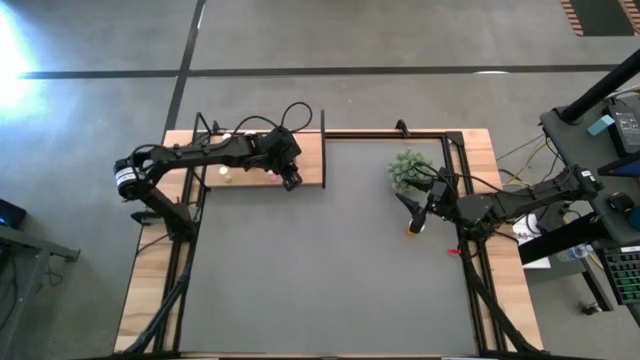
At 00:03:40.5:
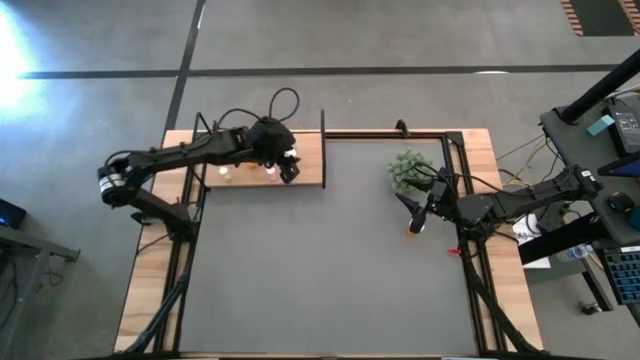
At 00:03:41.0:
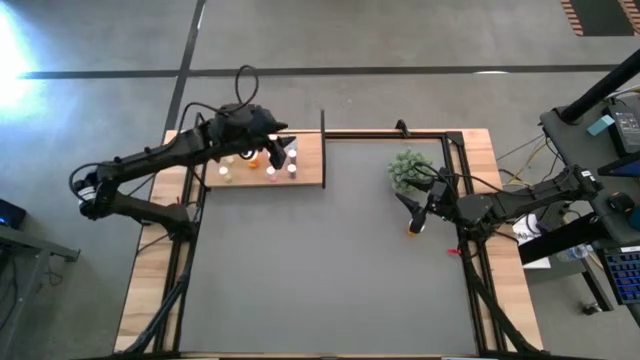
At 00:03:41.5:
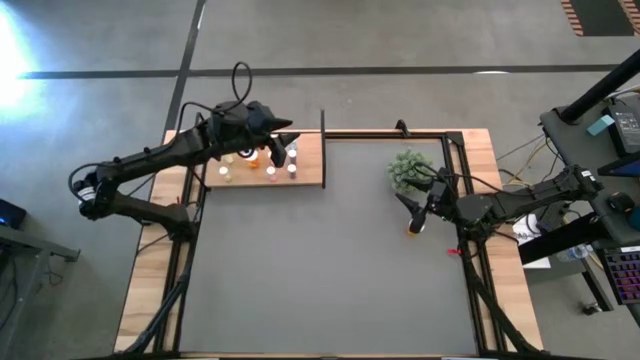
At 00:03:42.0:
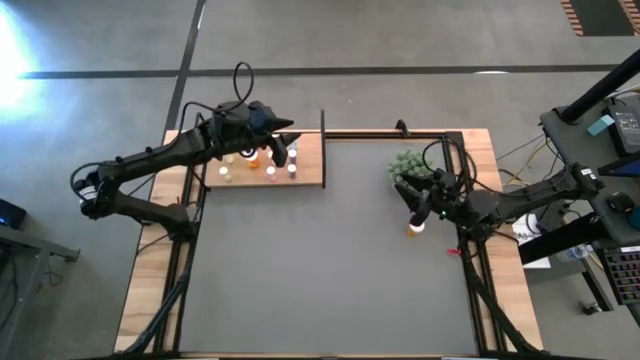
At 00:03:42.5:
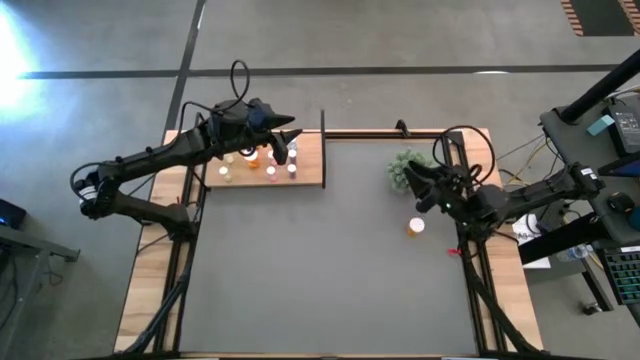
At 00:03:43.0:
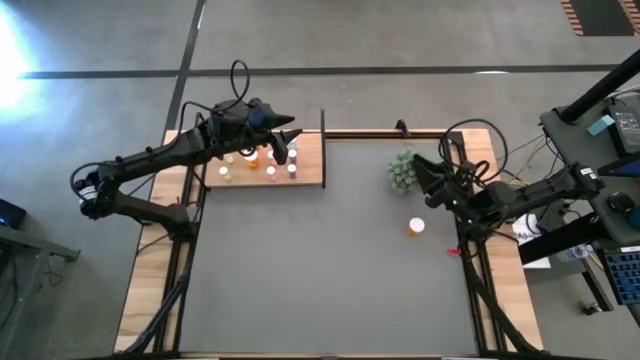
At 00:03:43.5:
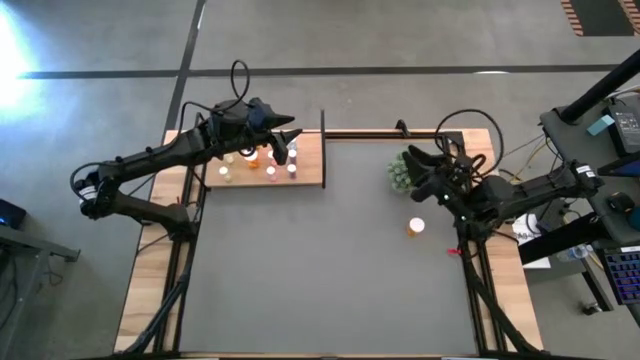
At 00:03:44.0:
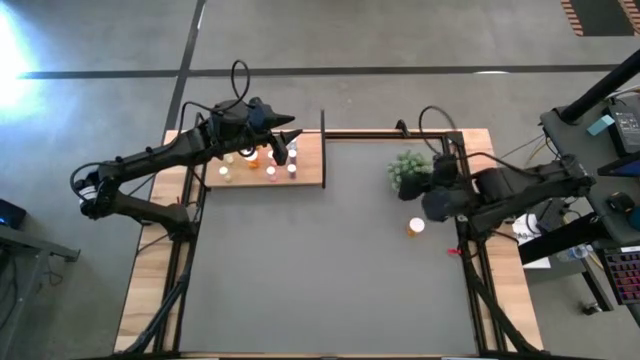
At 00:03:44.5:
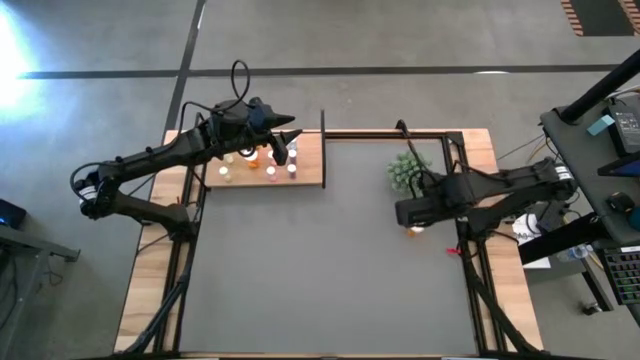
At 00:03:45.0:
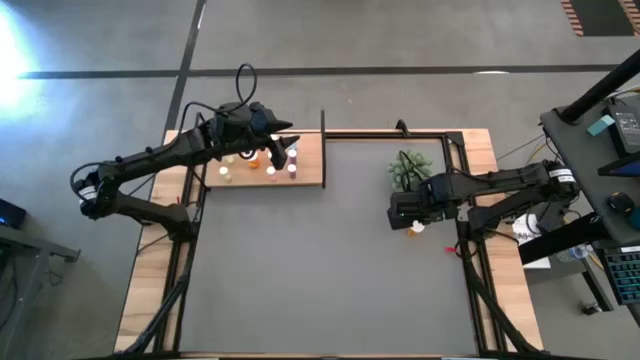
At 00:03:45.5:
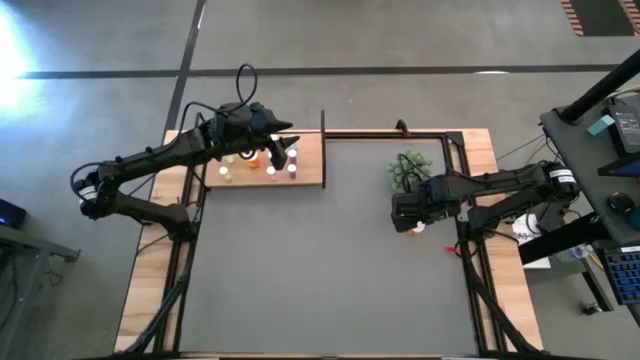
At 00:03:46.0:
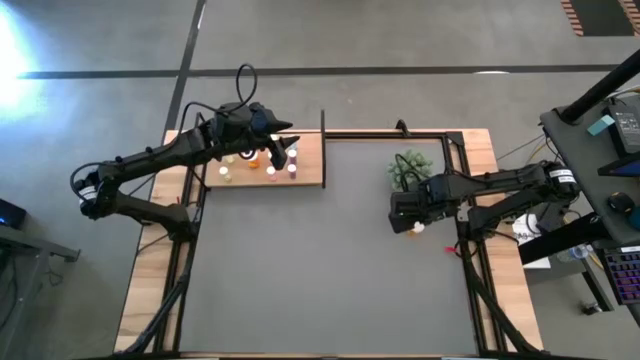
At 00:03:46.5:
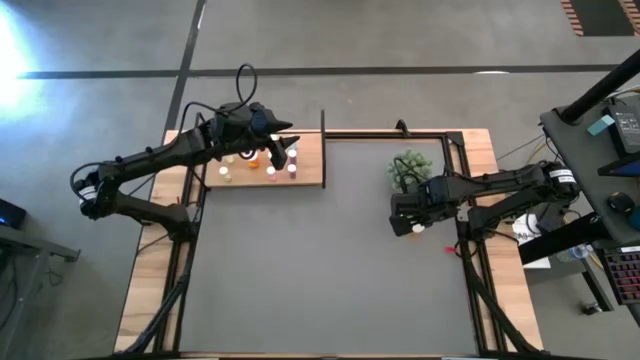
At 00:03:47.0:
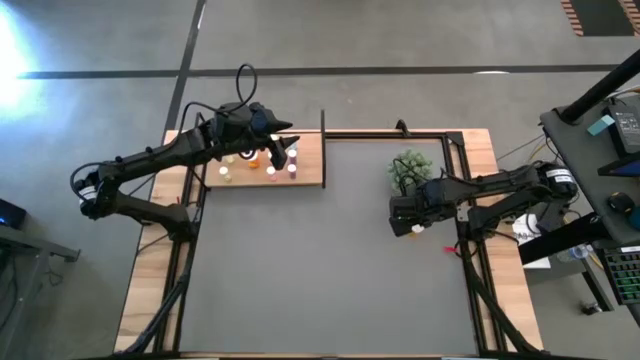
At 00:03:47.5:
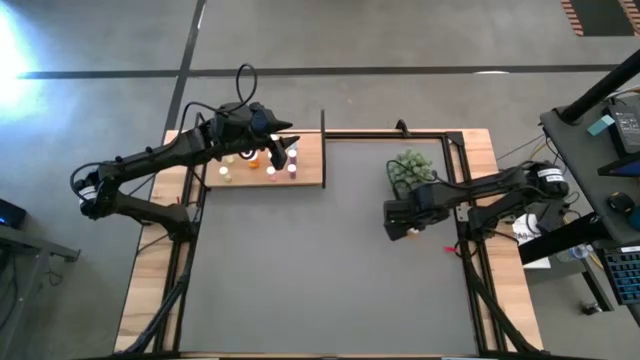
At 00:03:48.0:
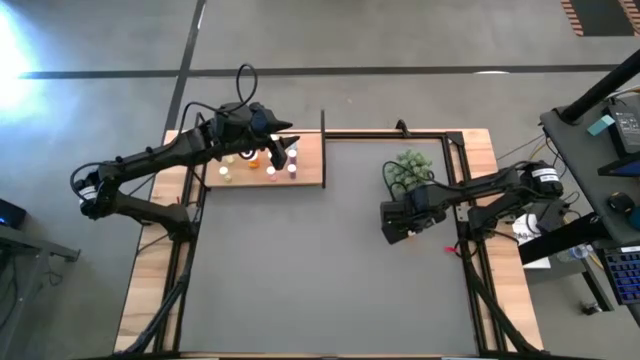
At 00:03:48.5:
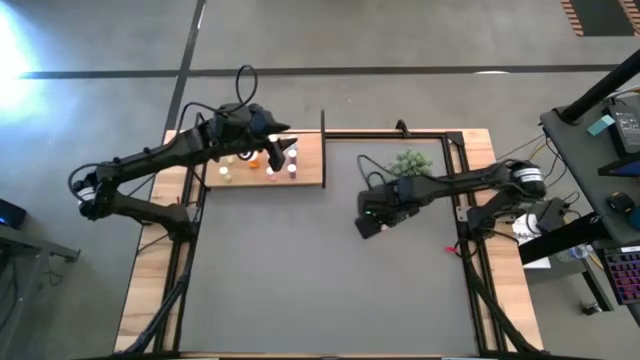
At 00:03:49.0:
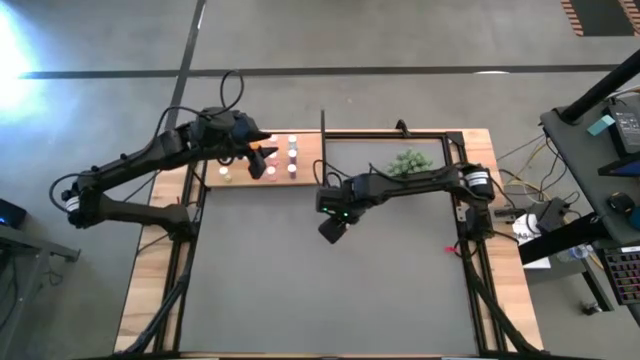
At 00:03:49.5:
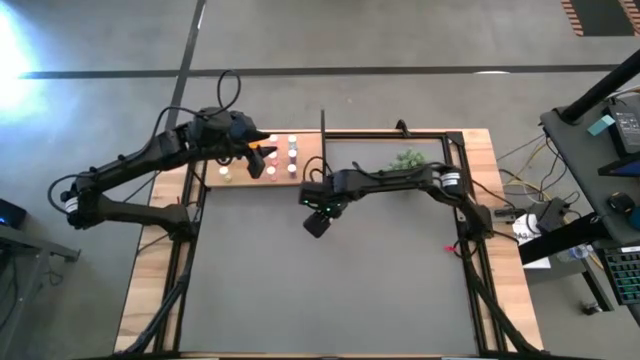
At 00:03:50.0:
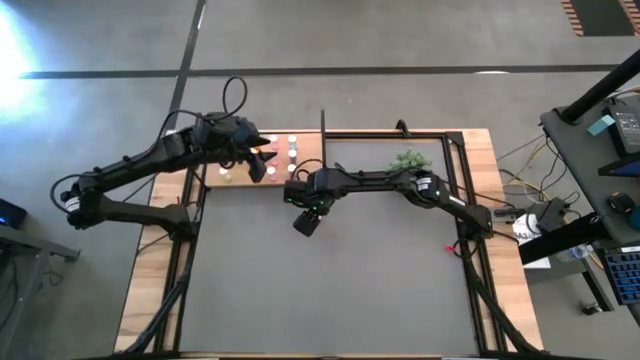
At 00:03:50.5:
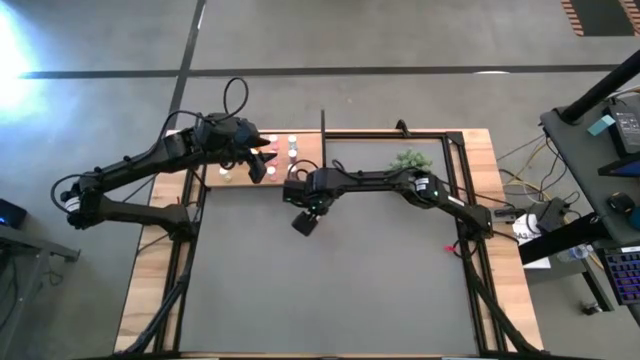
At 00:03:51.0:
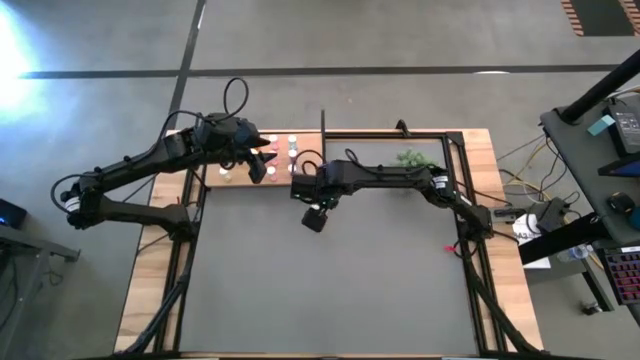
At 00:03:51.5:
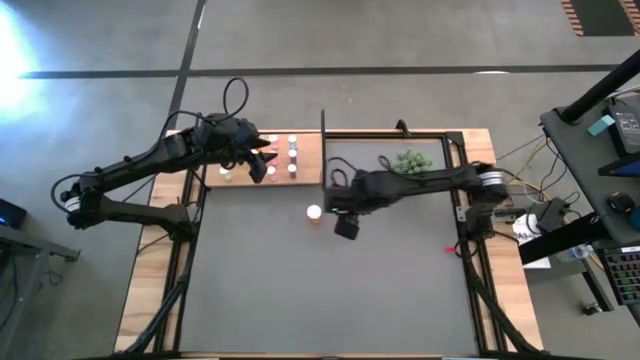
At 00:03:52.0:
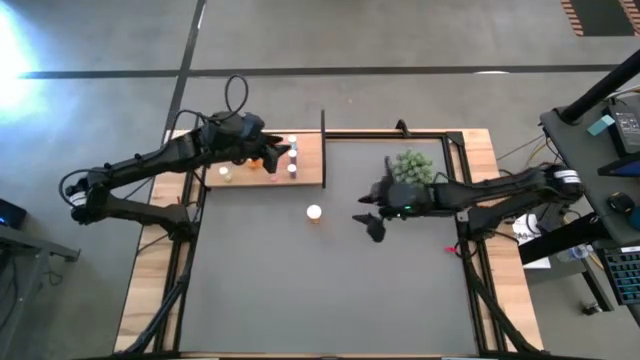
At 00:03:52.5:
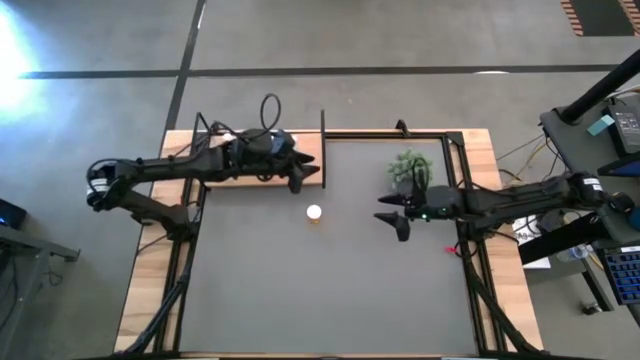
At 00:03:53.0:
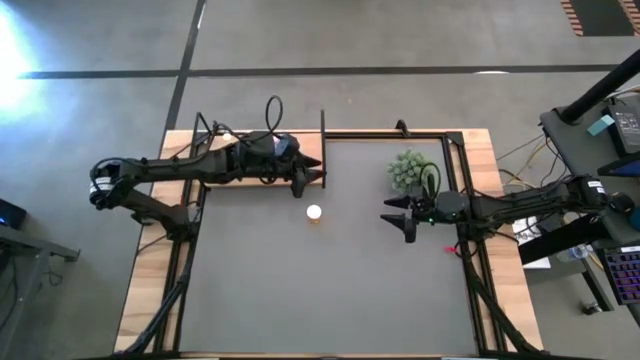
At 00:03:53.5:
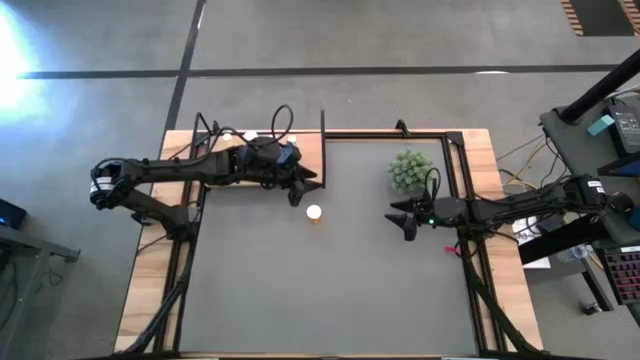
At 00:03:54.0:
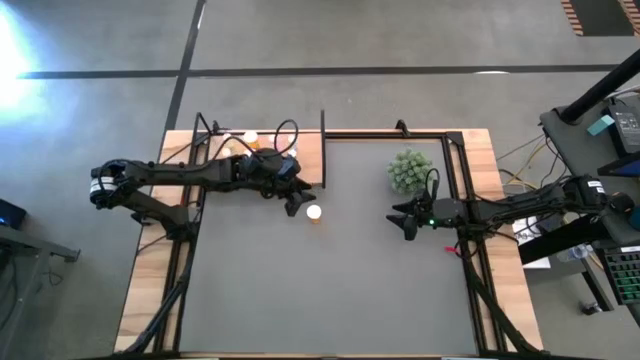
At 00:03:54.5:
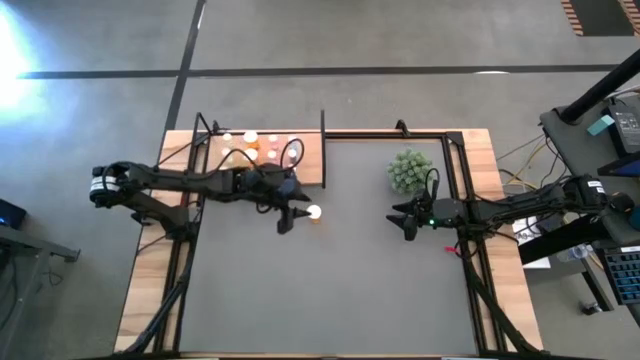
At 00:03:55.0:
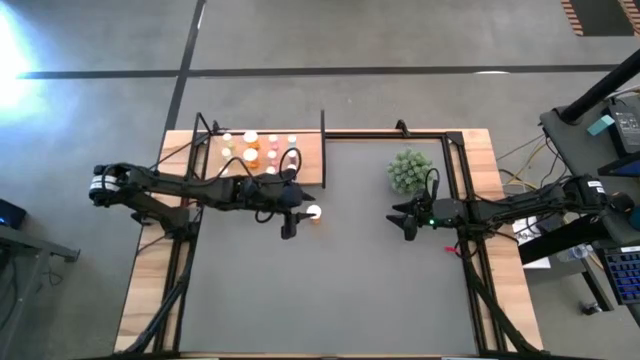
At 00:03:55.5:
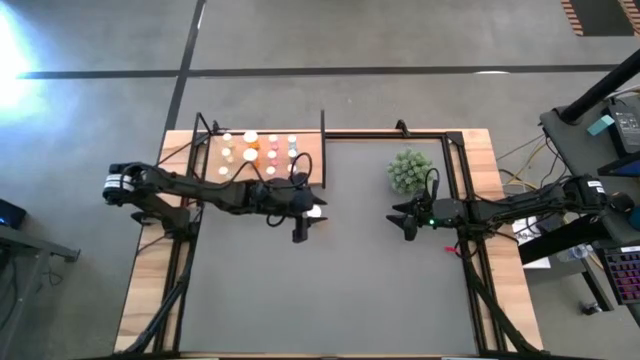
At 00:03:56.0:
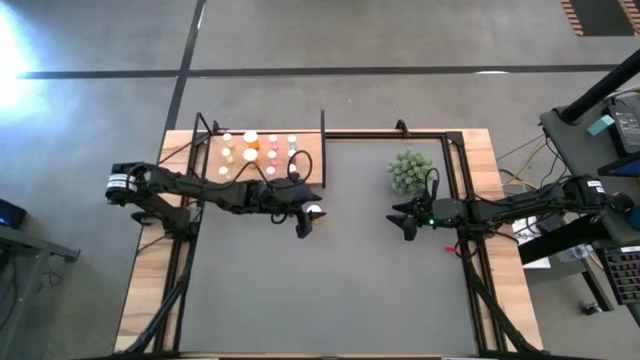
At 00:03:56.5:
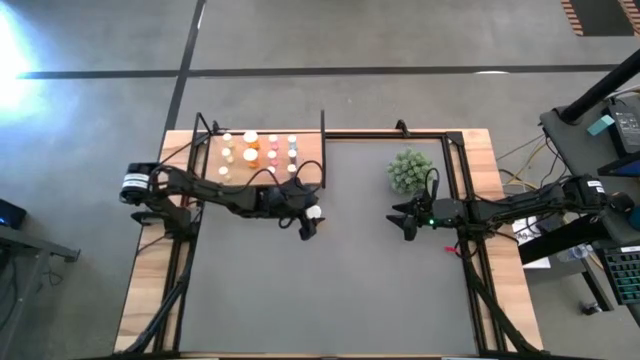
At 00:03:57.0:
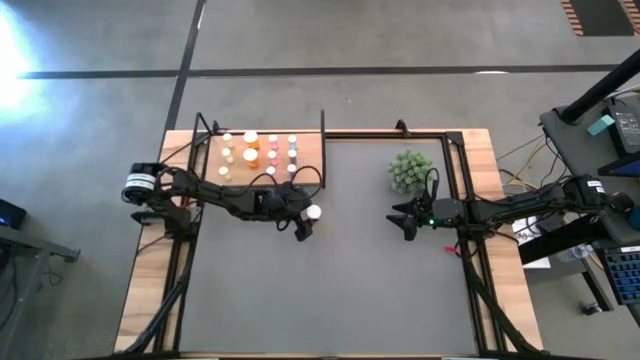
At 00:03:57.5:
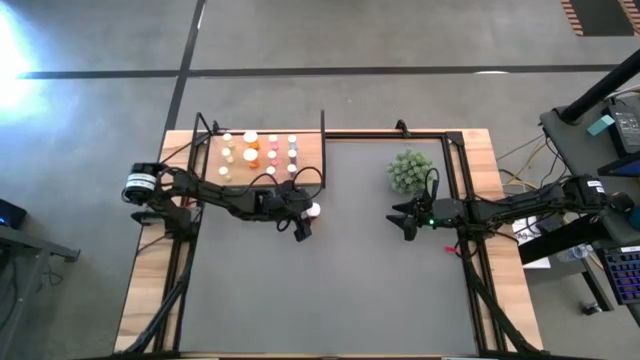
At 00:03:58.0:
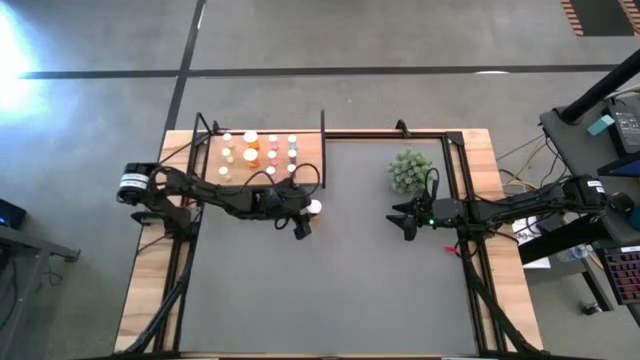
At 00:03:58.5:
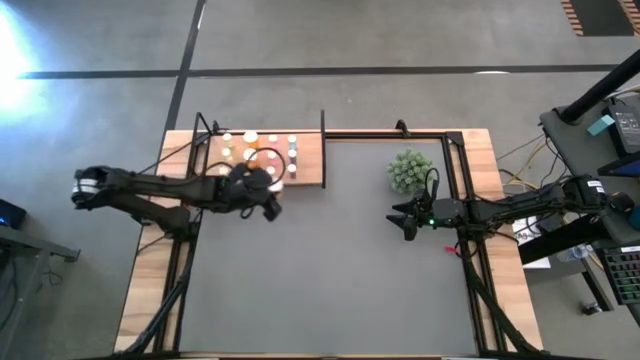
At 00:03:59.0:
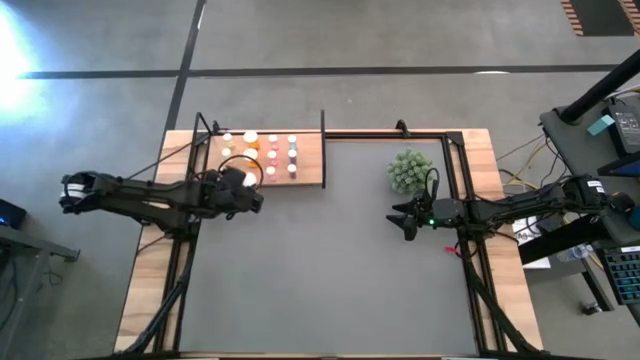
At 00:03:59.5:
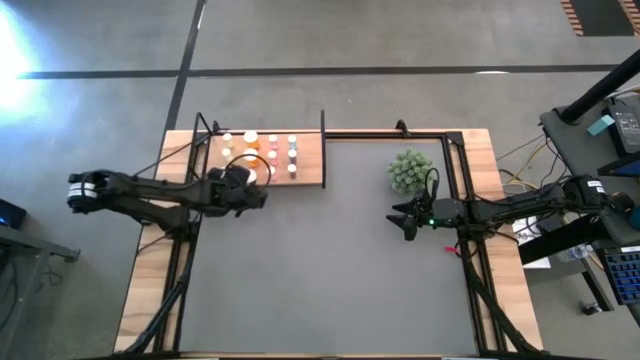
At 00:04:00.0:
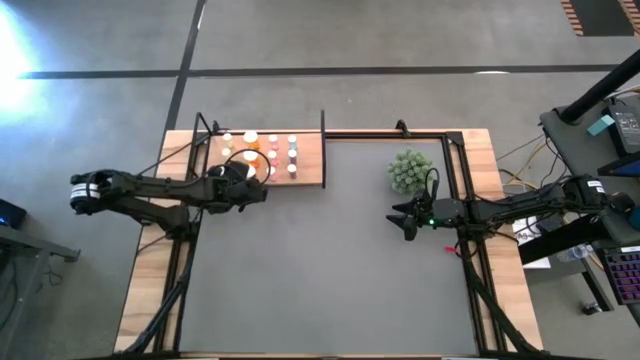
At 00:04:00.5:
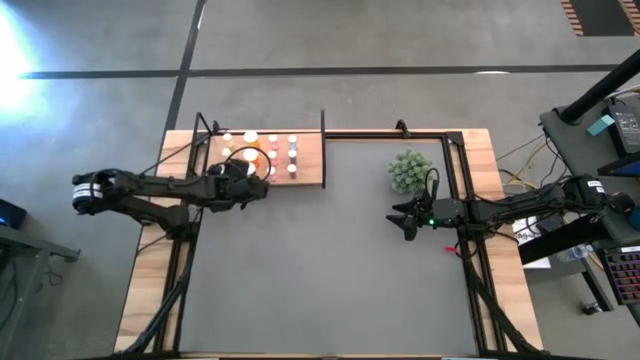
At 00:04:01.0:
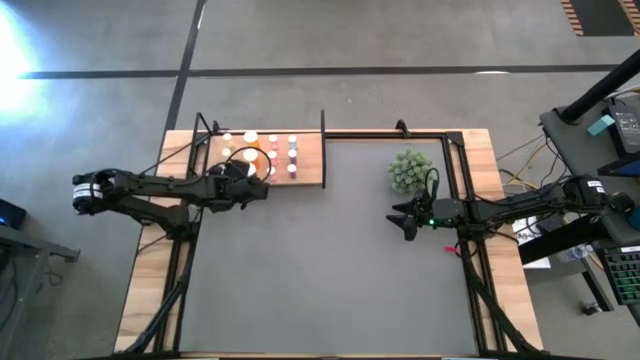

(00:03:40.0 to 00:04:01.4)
Task: Pick and place medicine bottles onto shelf by color
Put the orange pill bottle on the shelf aligned with the other orange bottles
